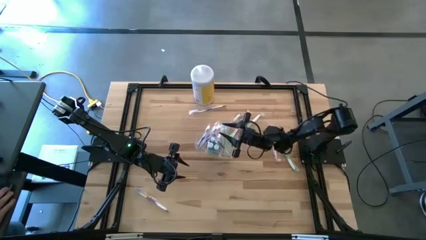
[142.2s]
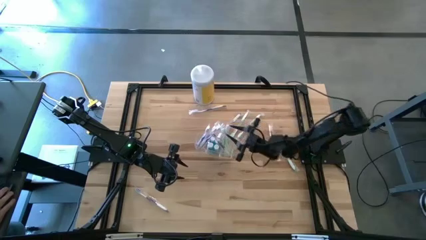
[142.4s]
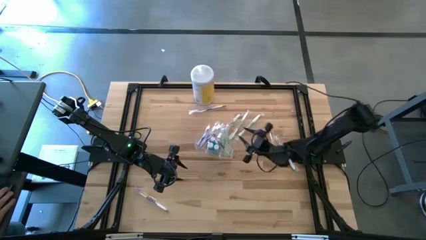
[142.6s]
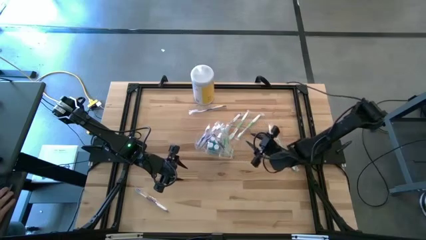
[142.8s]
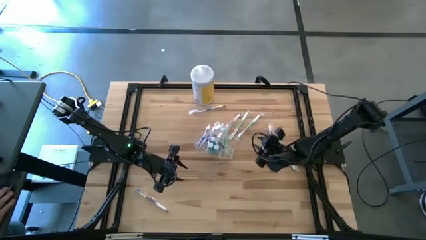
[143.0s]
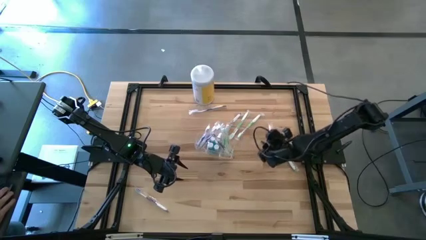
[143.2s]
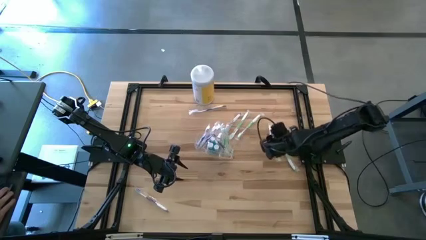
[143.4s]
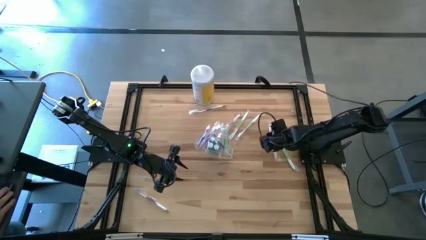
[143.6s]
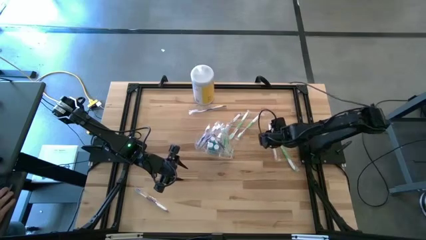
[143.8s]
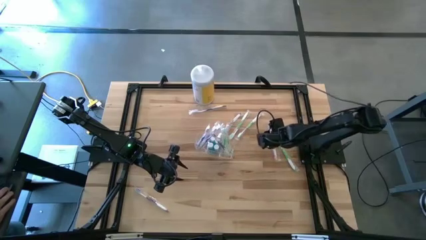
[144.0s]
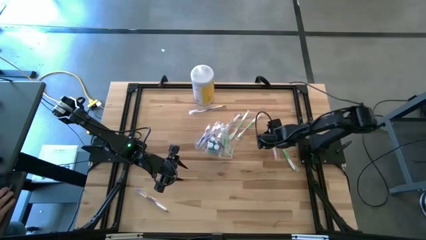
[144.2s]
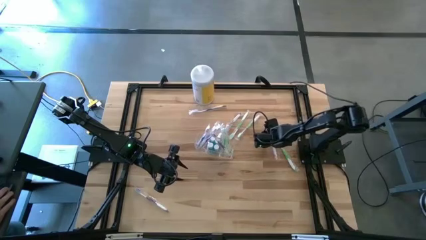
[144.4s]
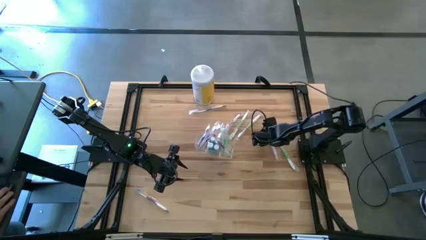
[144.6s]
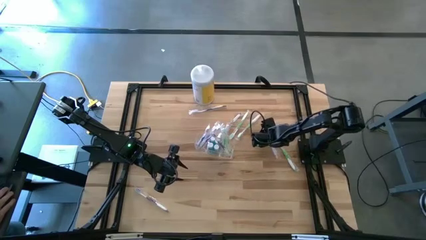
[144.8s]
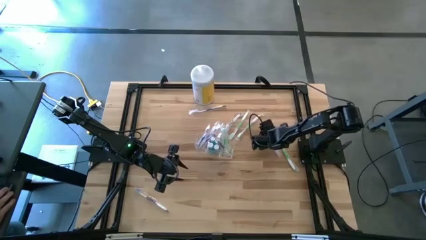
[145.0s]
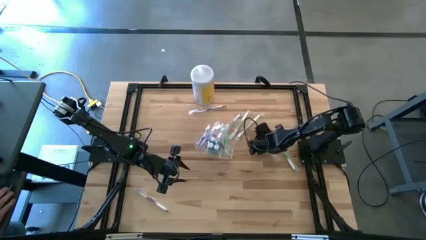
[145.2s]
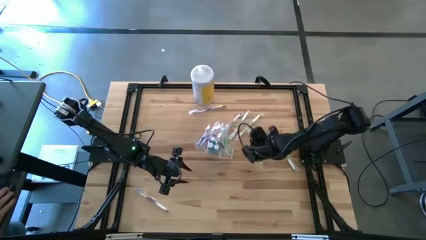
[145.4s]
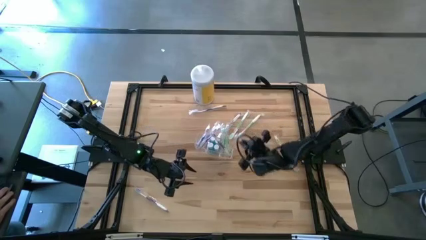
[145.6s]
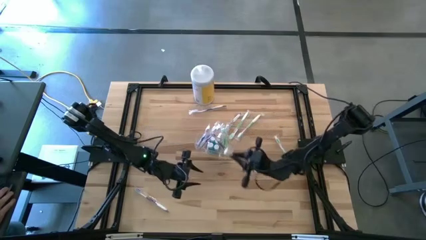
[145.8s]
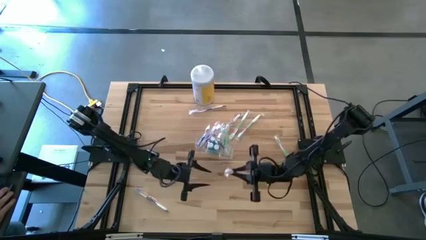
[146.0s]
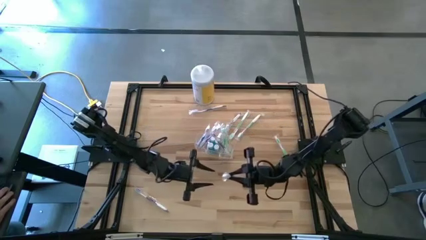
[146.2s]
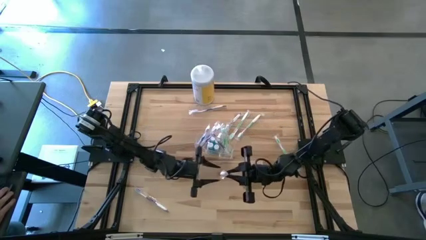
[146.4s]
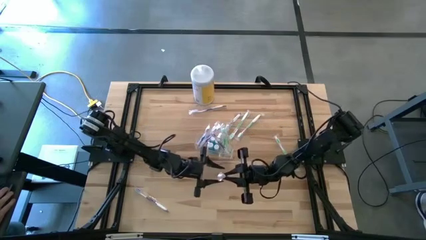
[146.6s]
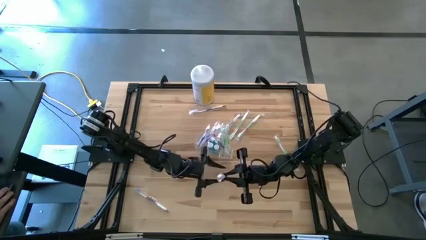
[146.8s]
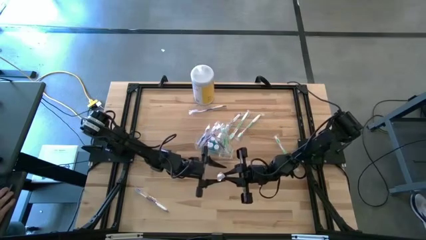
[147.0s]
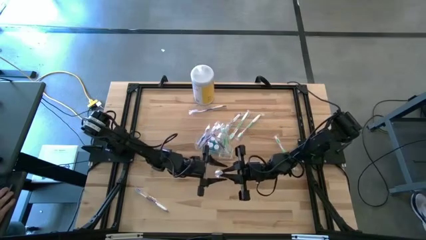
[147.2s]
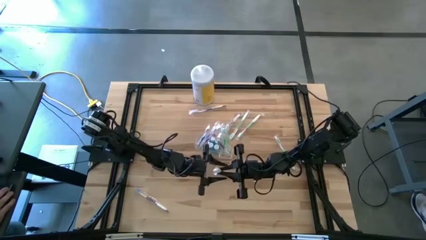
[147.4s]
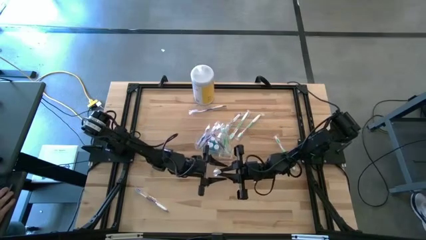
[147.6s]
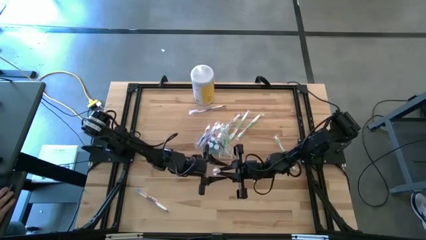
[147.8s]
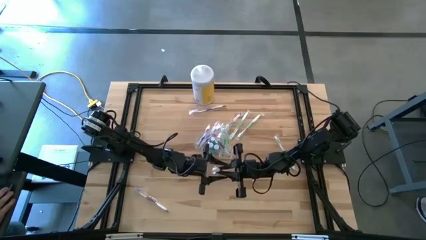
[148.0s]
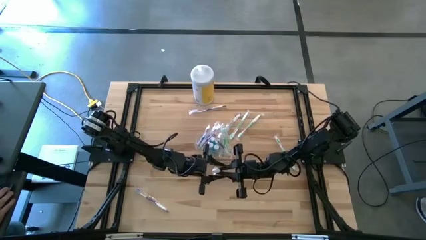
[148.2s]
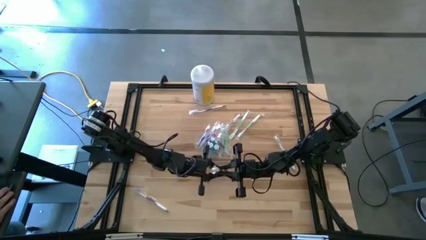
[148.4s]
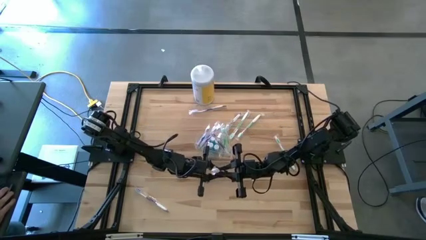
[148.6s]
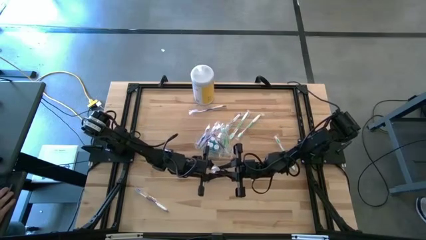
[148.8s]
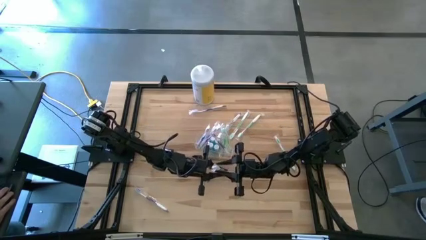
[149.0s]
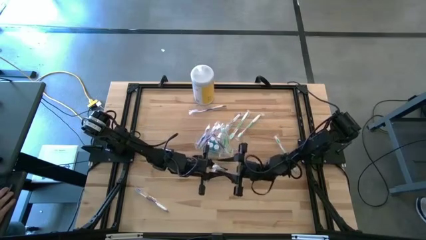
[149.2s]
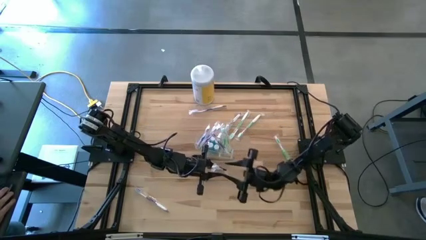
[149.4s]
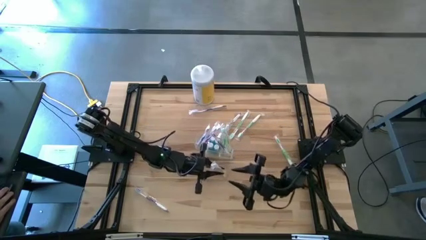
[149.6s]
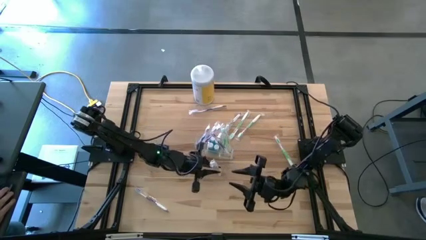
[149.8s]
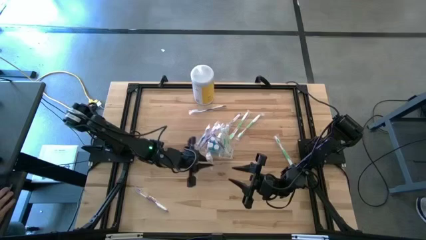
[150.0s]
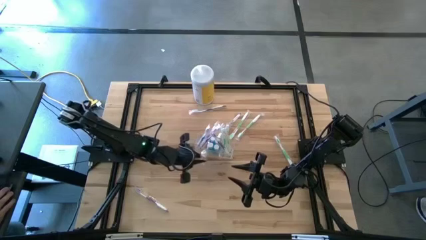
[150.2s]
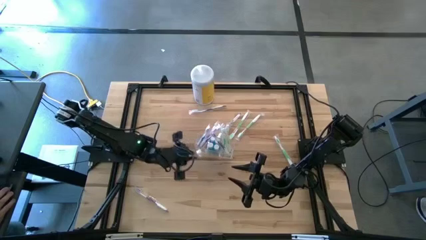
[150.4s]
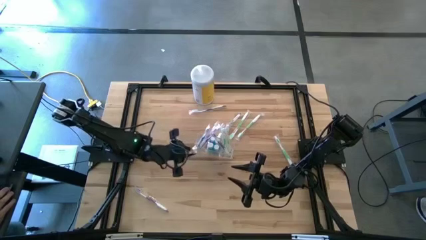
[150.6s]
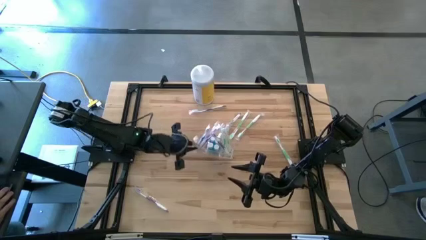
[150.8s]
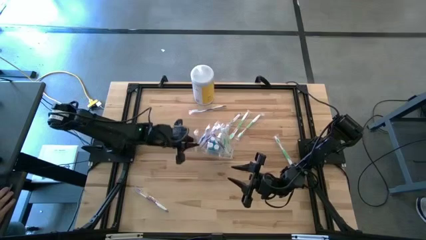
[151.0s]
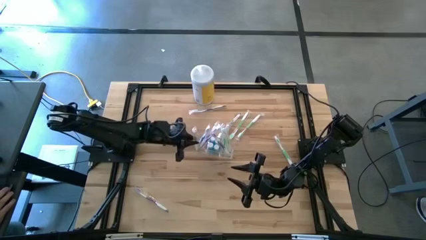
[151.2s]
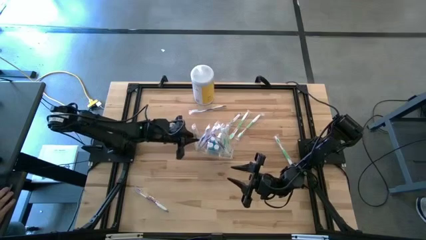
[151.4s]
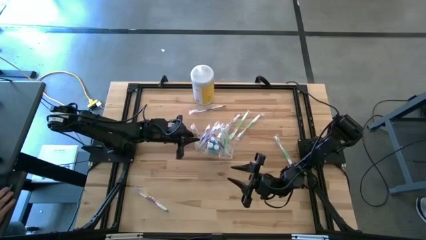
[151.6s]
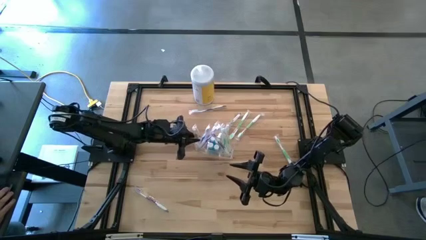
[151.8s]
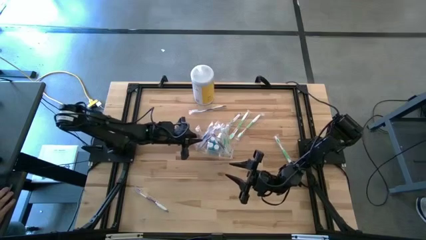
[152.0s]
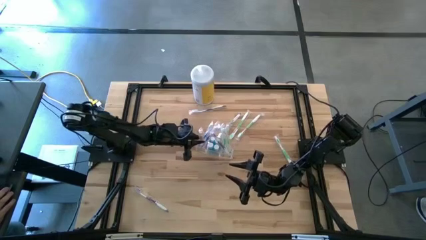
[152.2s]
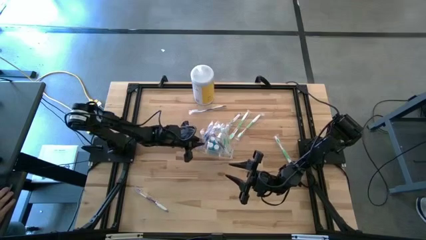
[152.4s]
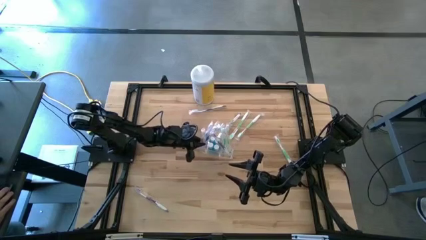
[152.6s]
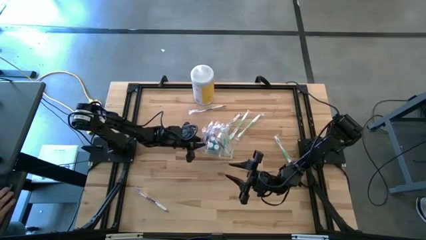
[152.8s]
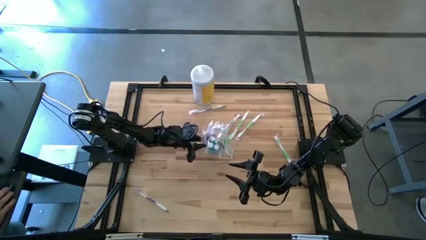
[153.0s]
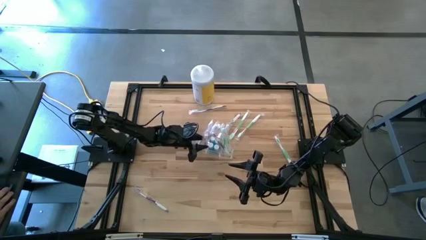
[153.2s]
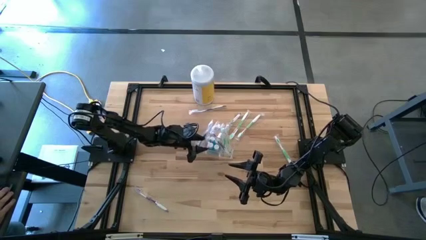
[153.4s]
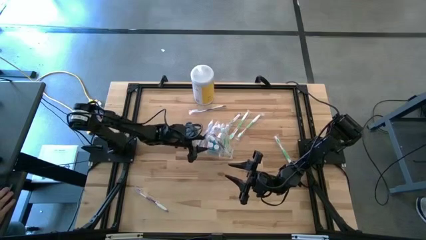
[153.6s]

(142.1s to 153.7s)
Task: Pick & Place toothbrushing station
Put the orange toothbrush into the transparent organizer
